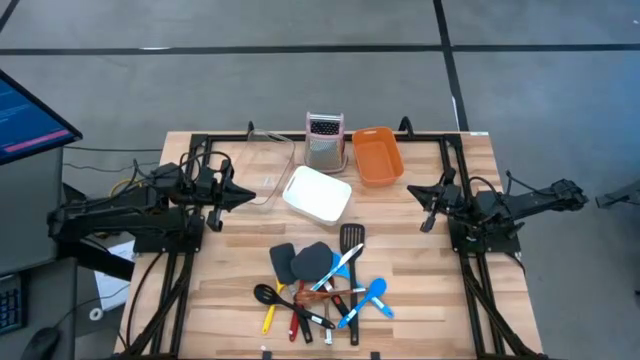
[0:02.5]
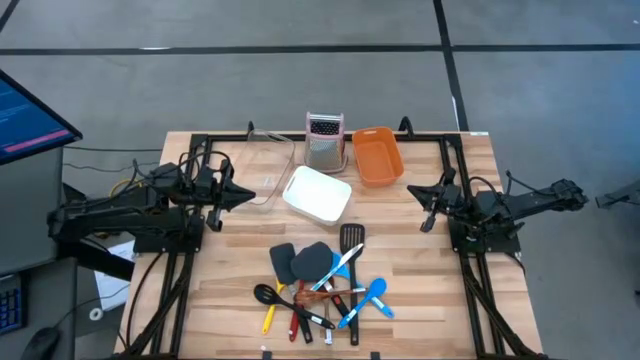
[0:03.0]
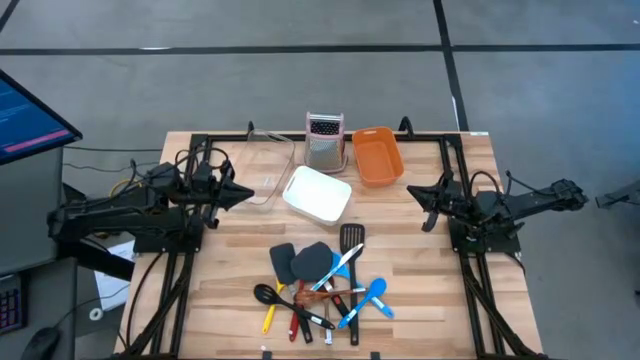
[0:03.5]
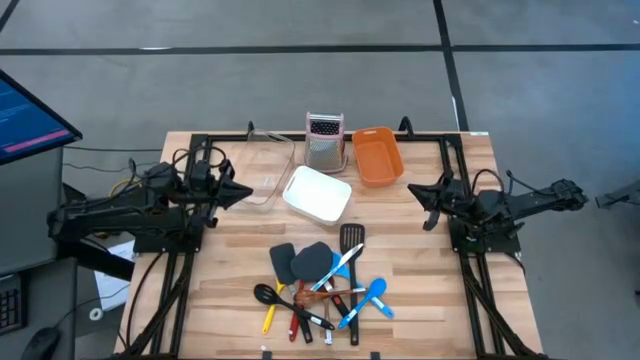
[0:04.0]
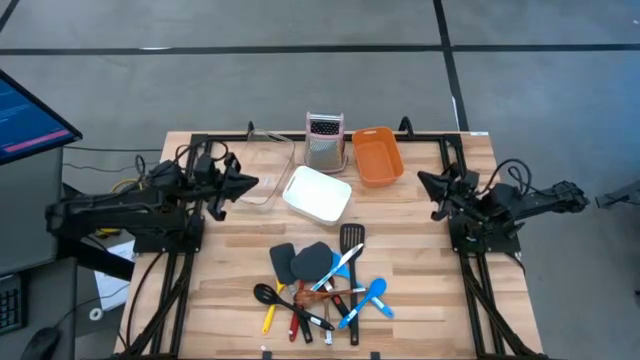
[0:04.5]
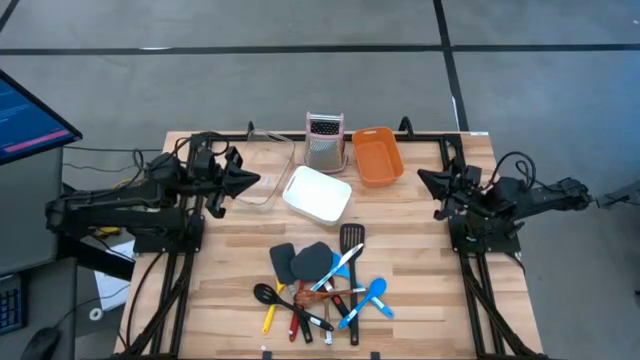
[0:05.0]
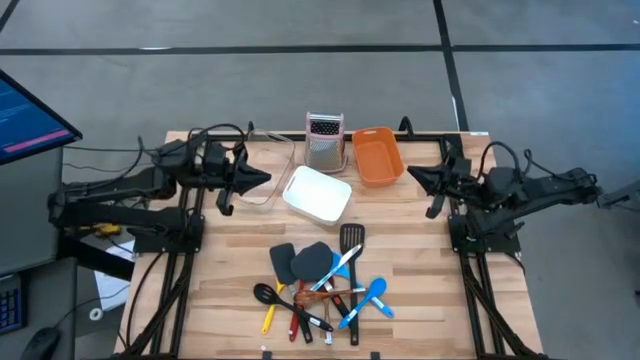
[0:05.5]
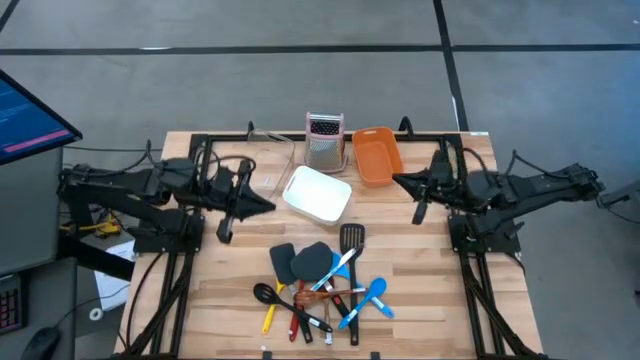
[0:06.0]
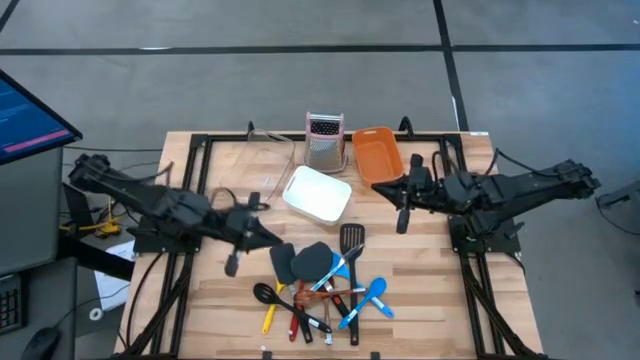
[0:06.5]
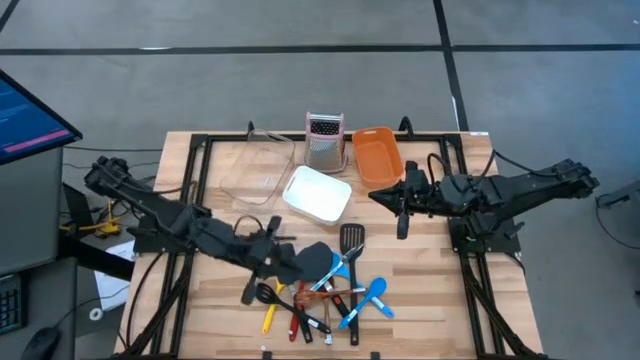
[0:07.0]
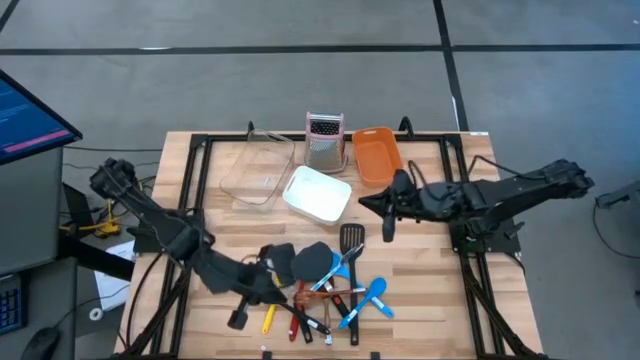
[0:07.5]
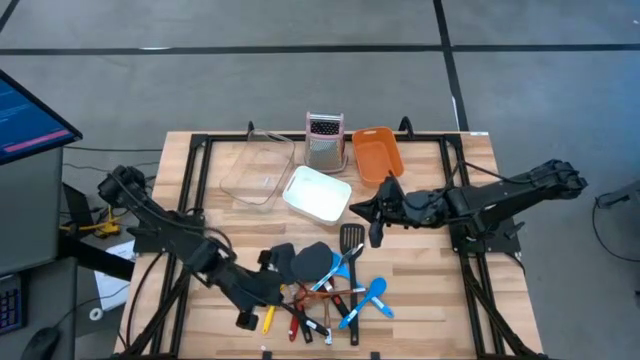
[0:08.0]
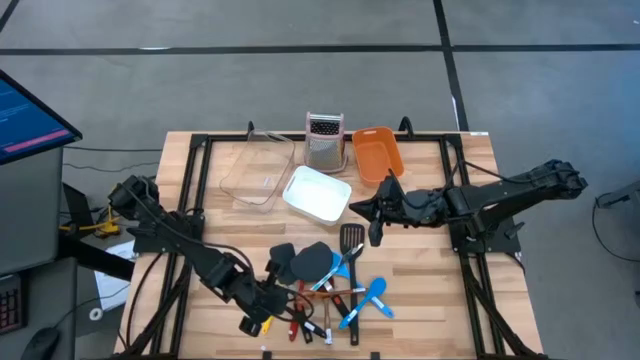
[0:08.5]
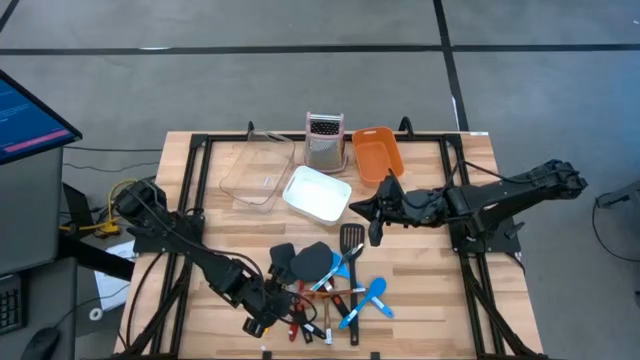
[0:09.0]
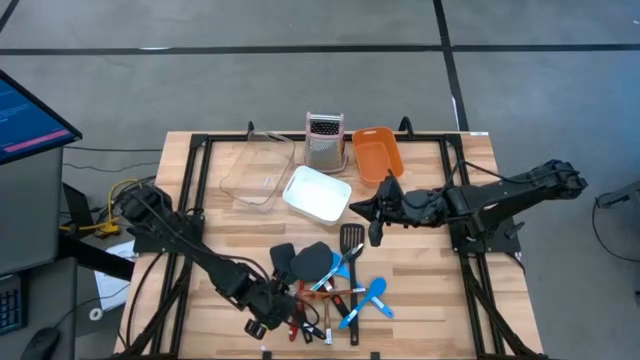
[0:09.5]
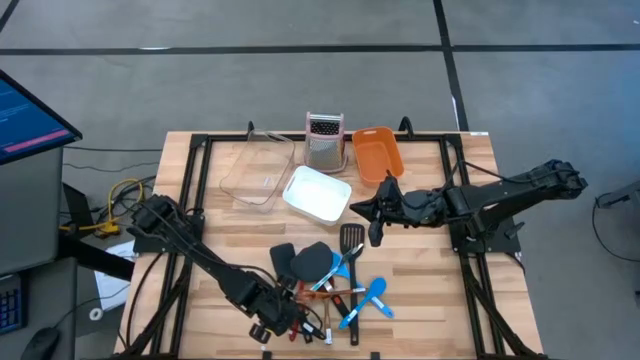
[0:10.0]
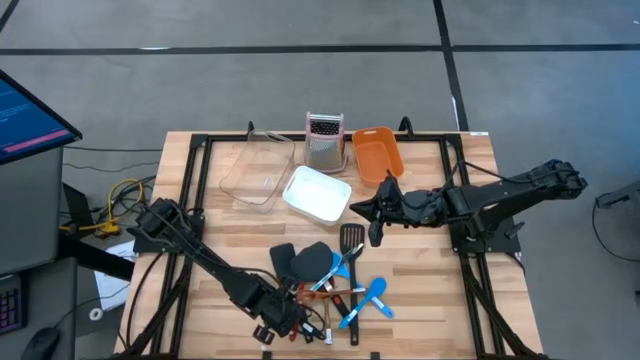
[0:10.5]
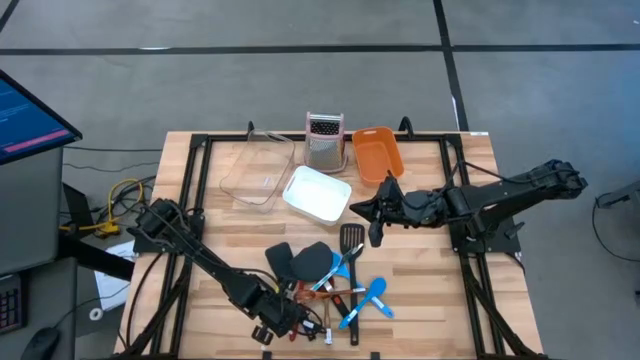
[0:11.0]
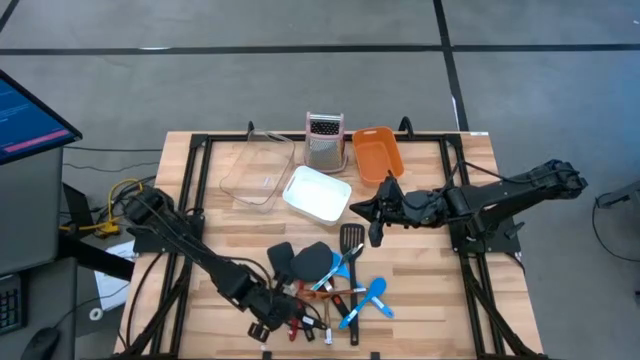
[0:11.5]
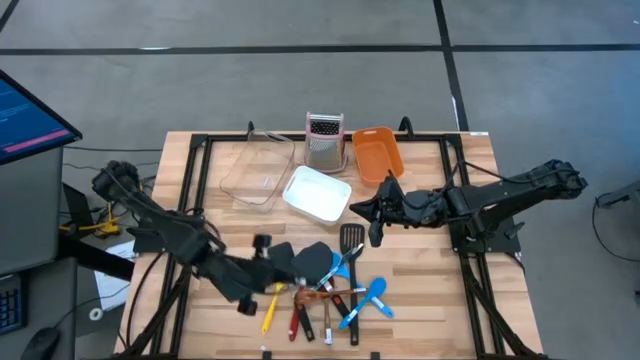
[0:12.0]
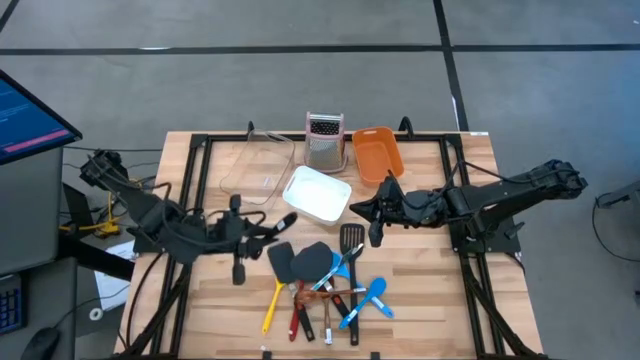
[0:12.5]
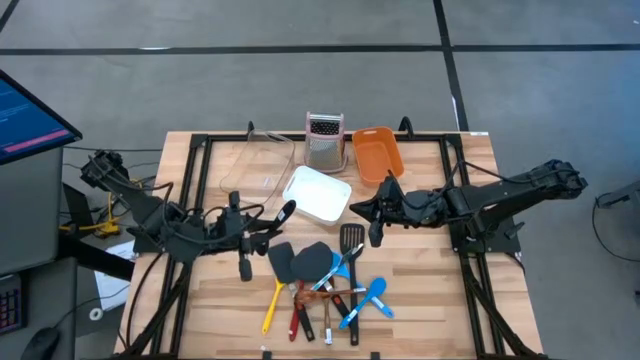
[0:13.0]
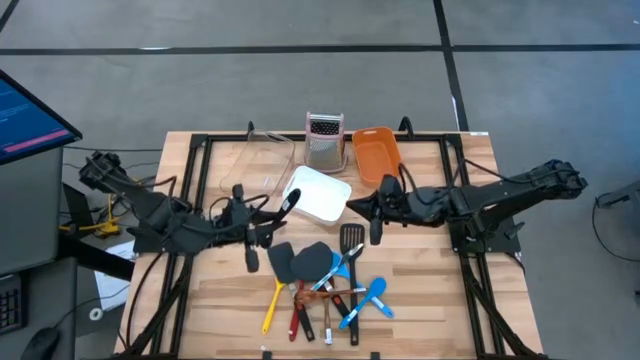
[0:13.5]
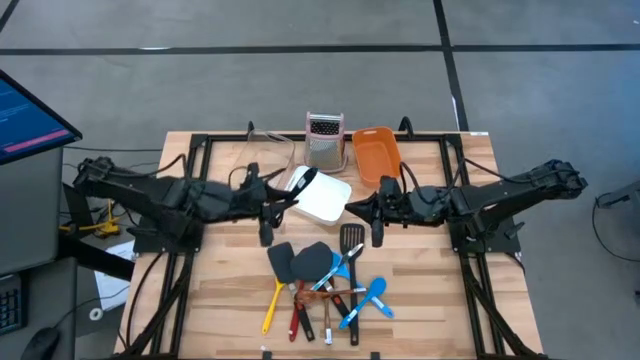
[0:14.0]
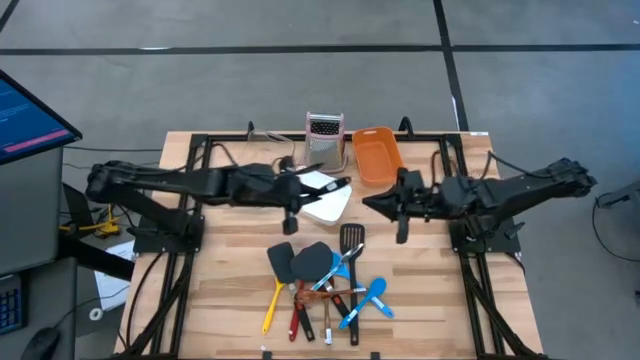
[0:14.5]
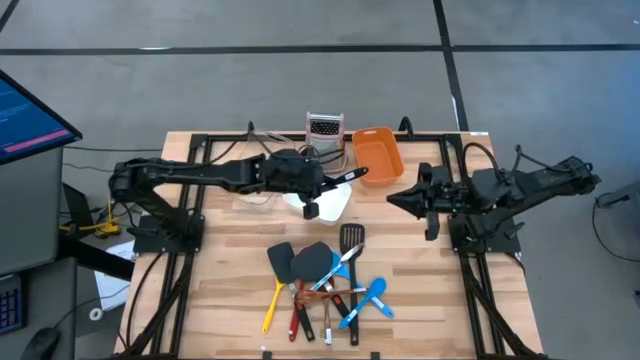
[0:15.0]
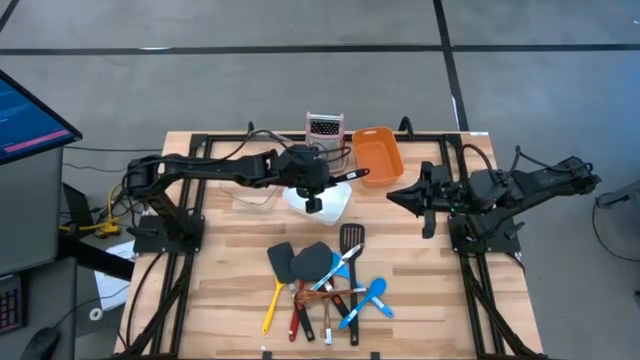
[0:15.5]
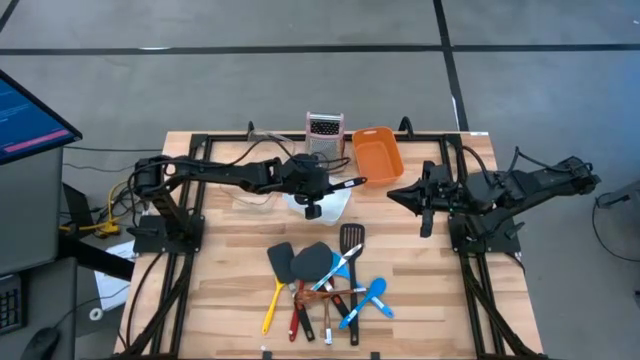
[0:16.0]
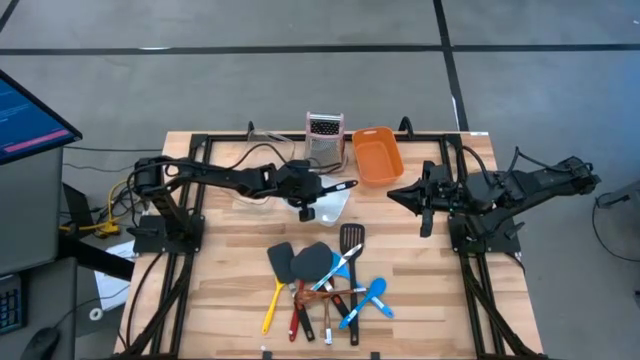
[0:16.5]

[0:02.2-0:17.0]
Task: Pick & Place Kitchen Items
Put the black slotted spoon into the white bin

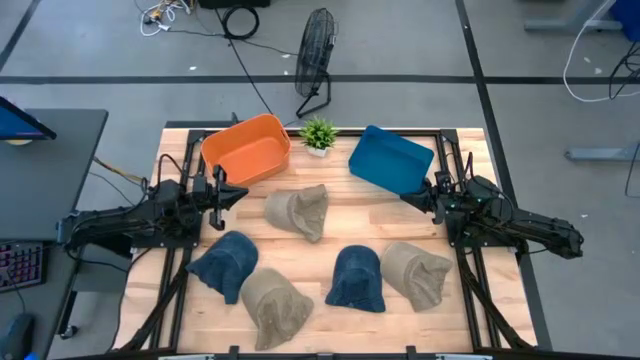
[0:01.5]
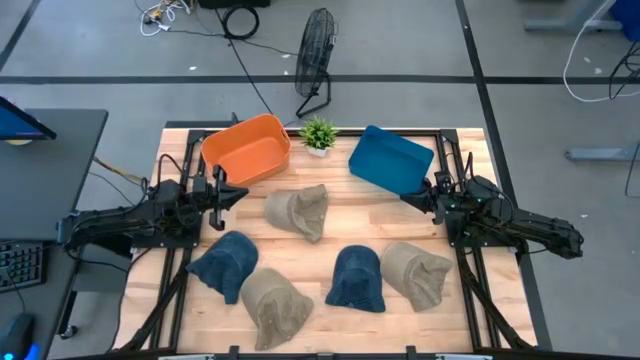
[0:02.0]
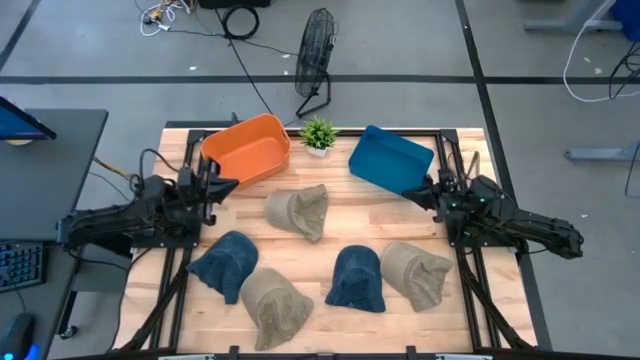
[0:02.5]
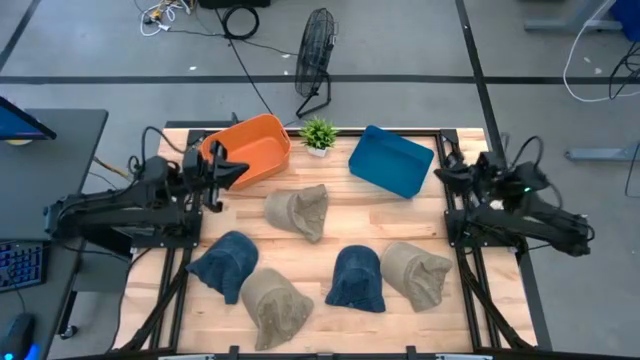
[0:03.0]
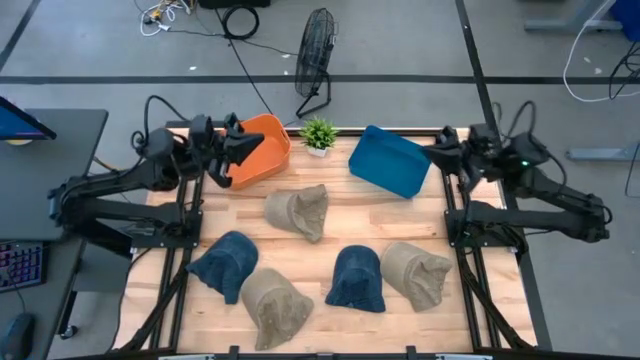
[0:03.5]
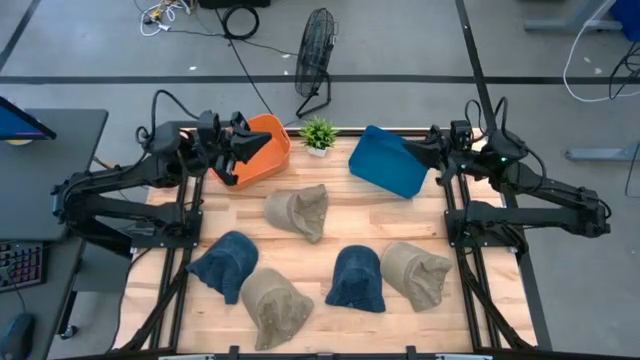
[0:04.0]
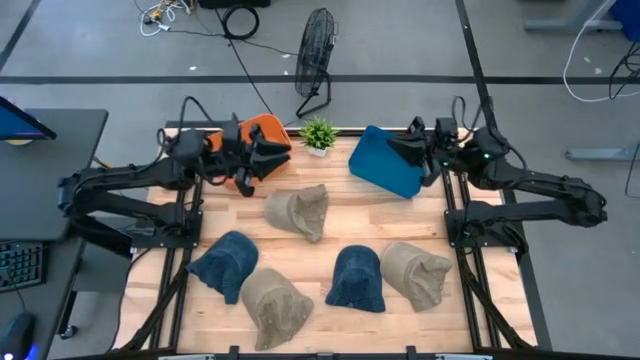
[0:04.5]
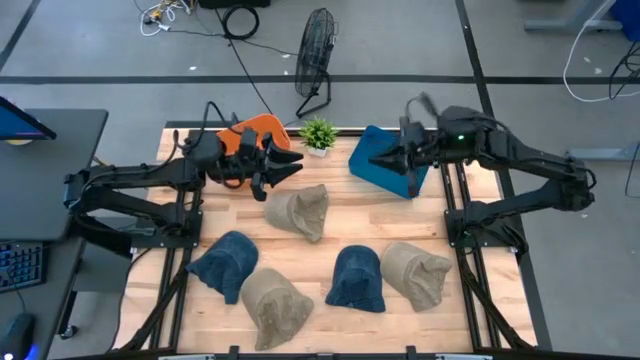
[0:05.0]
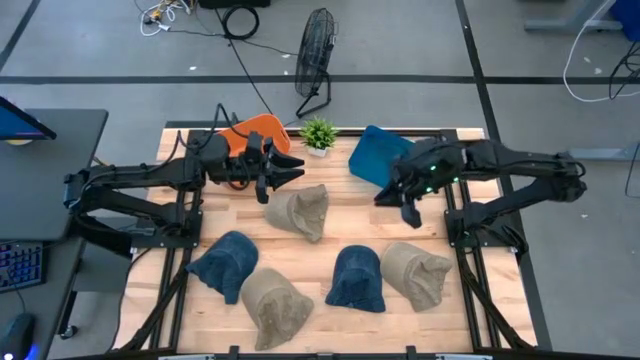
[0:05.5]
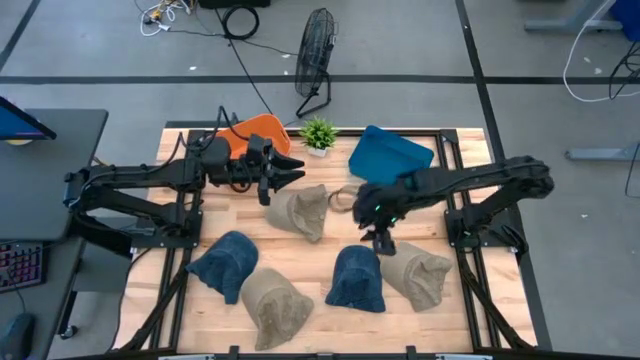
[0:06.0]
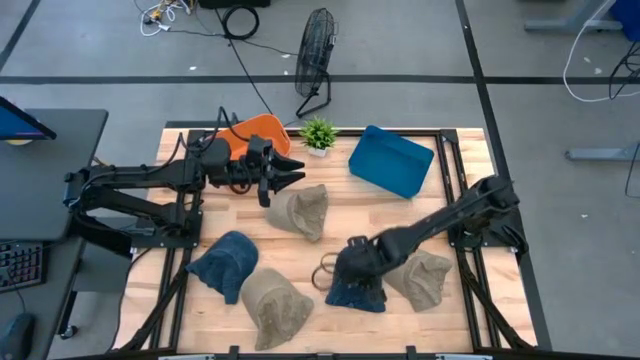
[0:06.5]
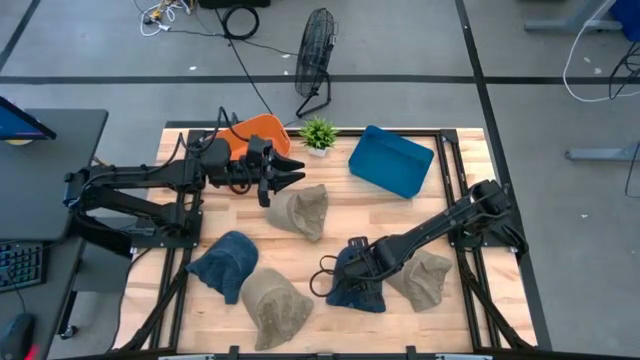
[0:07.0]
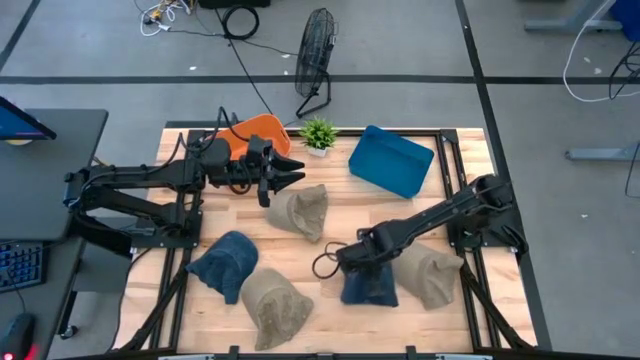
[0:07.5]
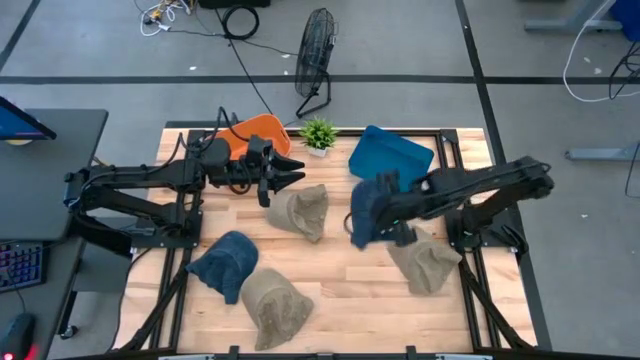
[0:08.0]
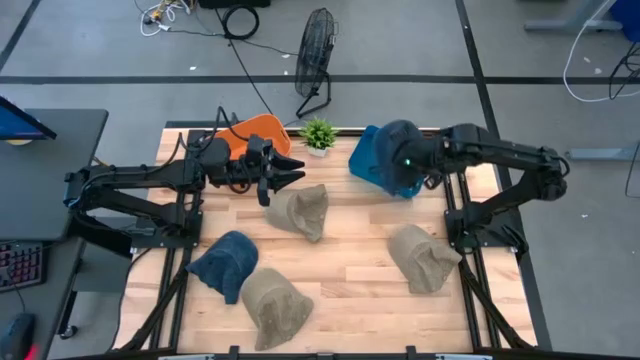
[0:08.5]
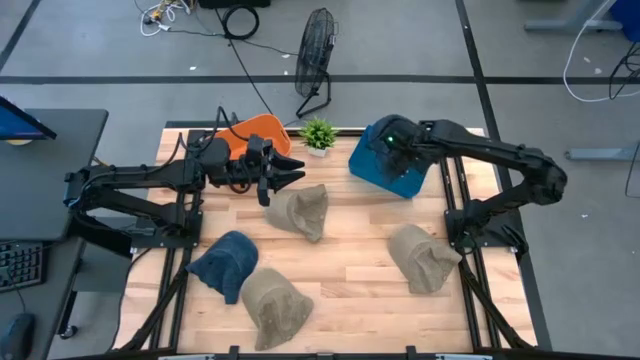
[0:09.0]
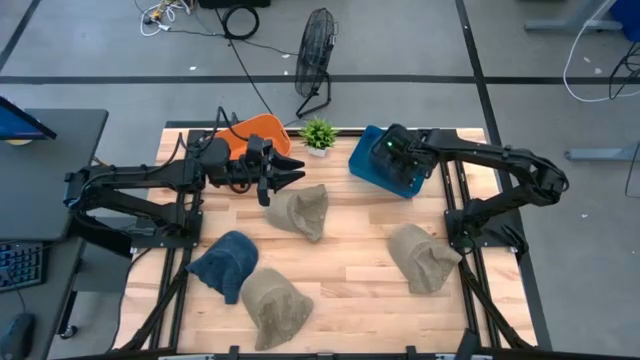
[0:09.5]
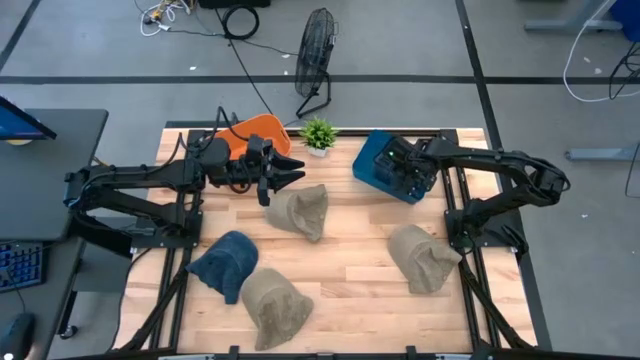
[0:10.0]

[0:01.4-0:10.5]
Task: Pick & Place hat
Put the right blue cap into the blue bin
